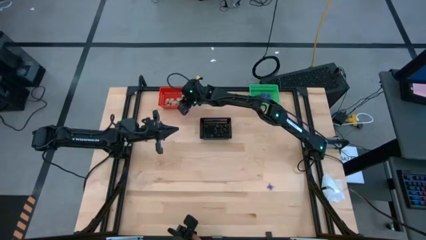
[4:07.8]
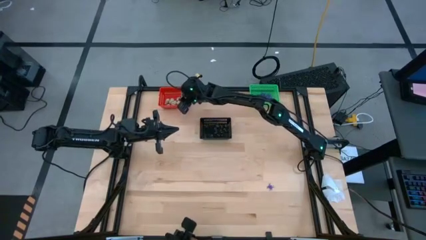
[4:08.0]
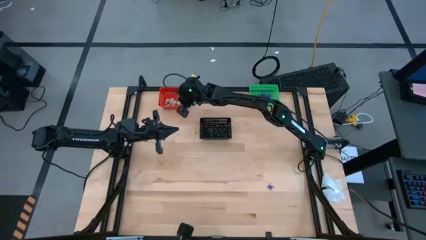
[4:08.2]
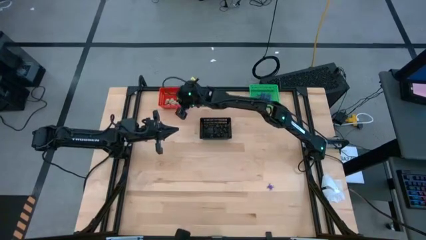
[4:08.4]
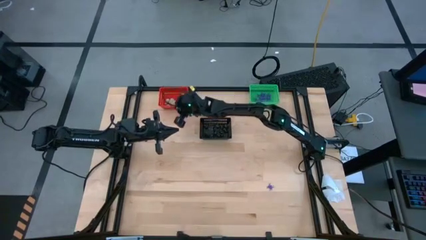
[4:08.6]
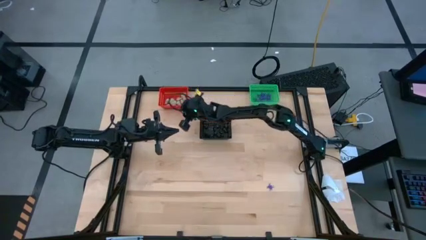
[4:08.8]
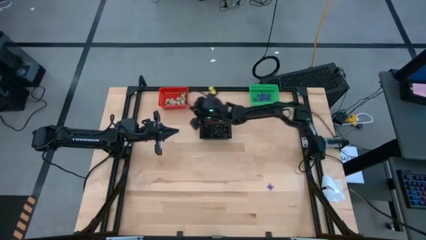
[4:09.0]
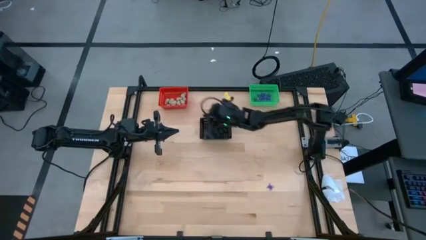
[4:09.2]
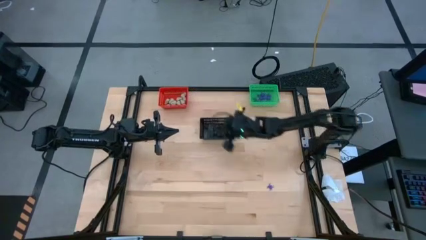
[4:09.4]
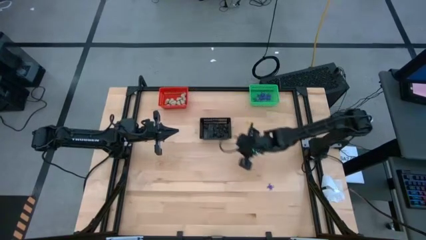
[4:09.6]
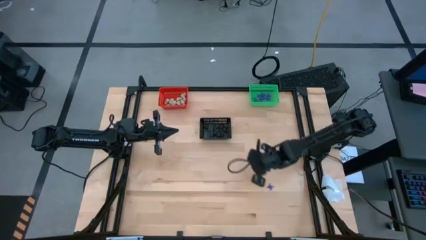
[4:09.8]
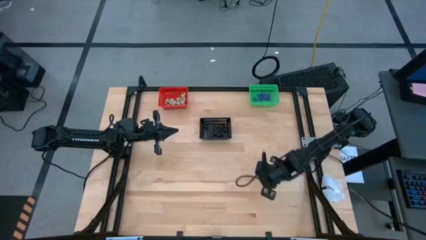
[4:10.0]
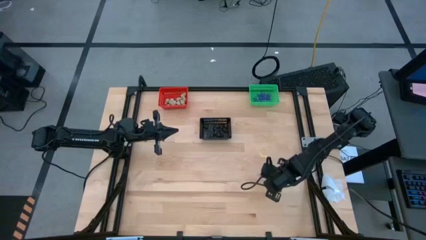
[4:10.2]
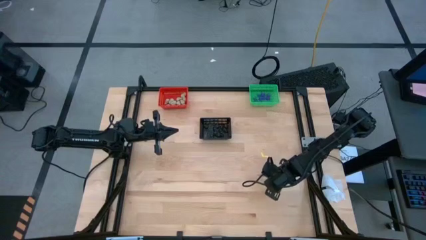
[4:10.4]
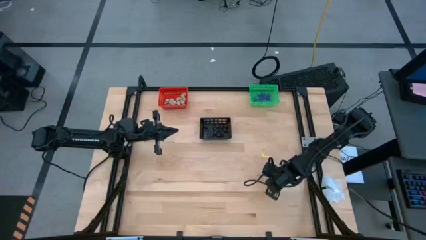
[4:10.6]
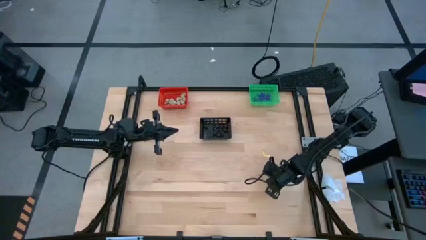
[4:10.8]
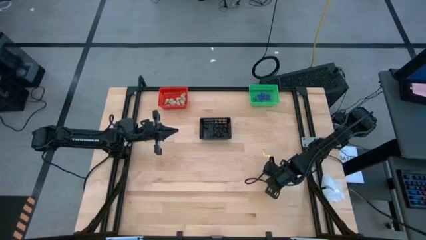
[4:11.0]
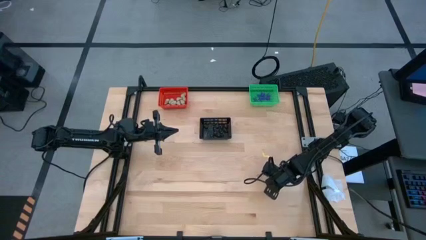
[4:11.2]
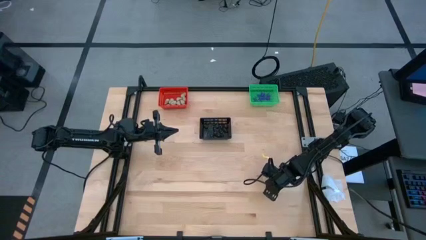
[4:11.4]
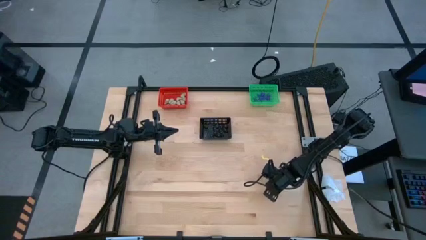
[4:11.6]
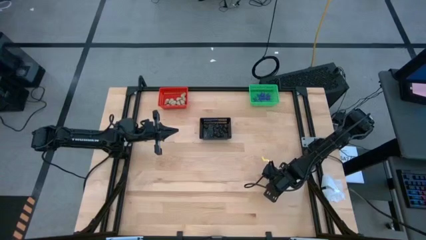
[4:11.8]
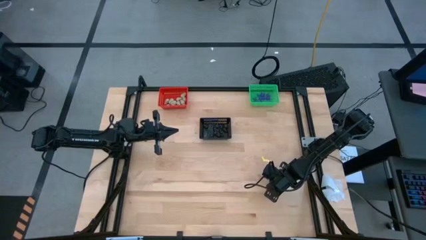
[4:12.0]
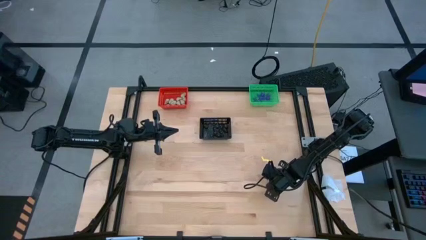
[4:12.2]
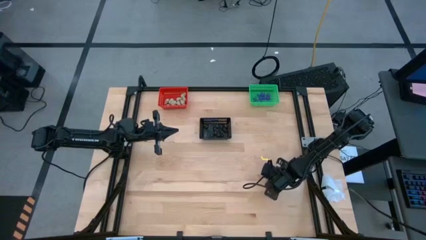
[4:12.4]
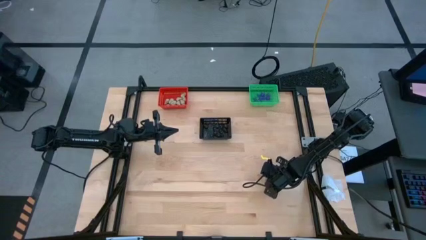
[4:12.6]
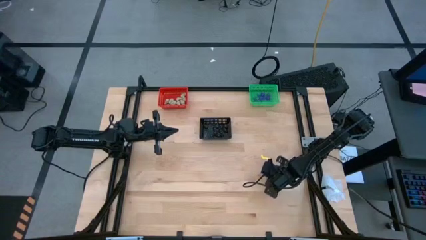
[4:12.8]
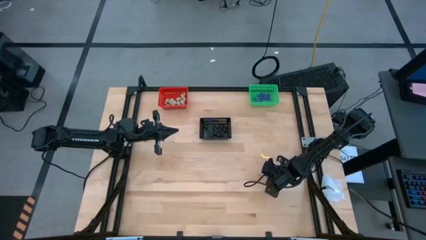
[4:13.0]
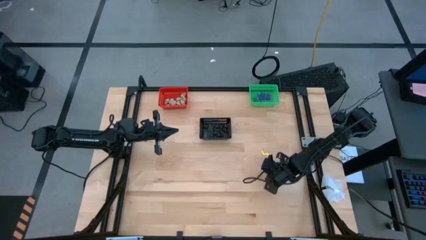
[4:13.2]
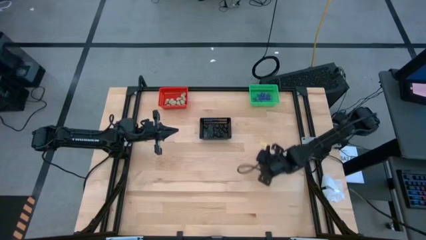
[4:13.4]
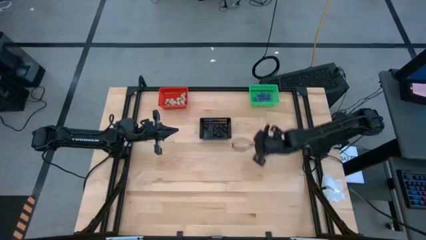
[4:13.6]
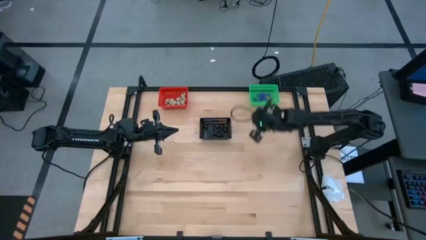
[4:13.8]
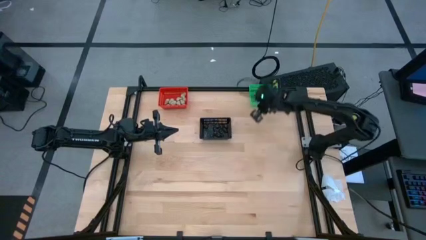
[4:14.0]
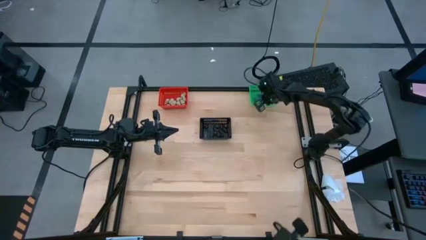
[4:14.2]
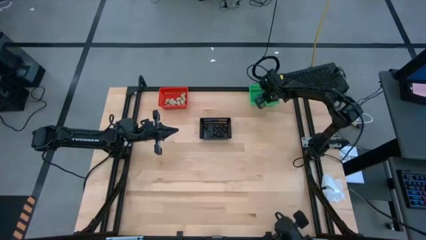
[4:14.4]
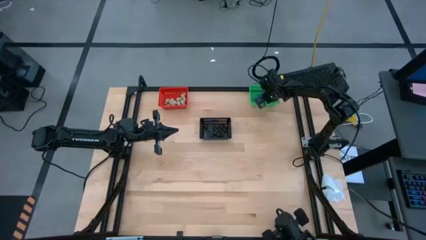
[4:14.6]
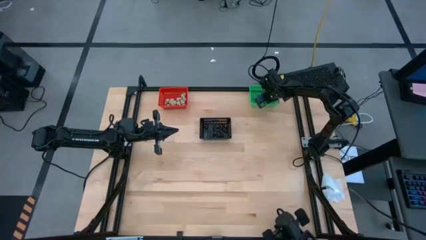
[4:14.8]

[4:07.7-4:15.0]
Task: Sort Halloween decoration
Put the violet spider toy into the green bin

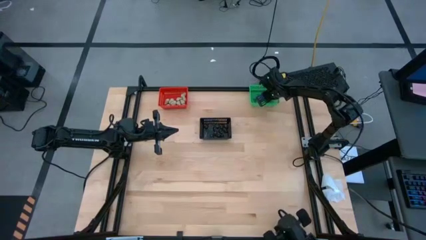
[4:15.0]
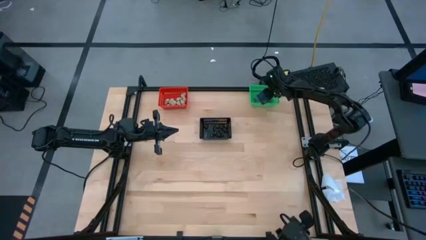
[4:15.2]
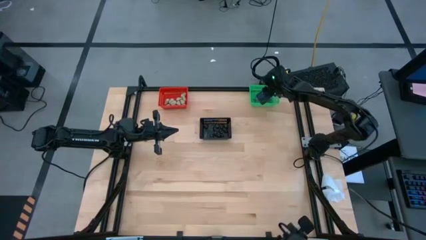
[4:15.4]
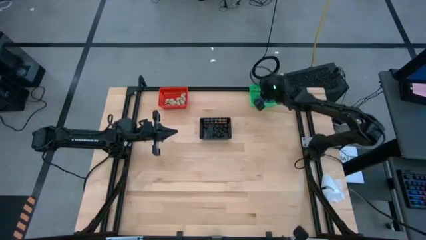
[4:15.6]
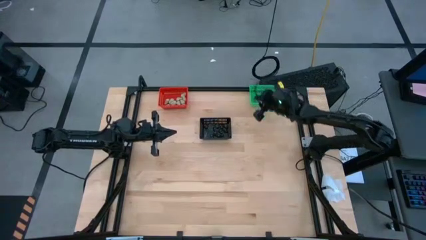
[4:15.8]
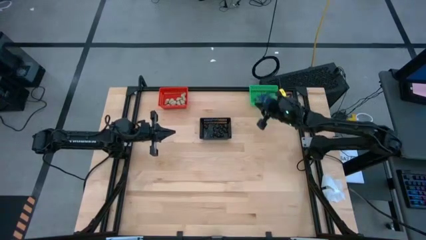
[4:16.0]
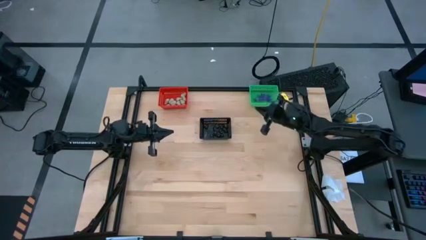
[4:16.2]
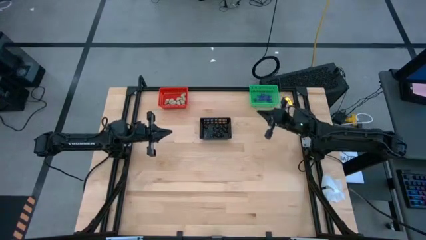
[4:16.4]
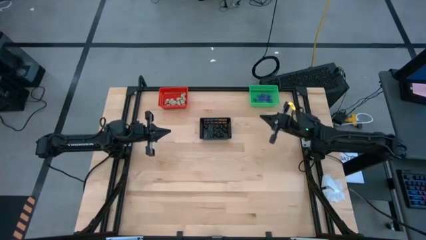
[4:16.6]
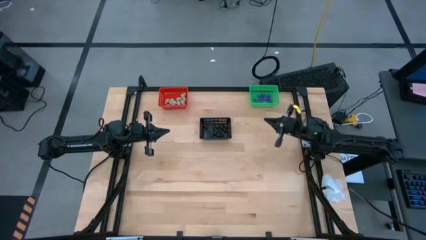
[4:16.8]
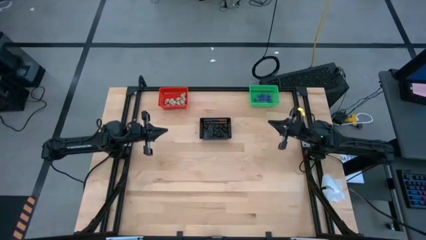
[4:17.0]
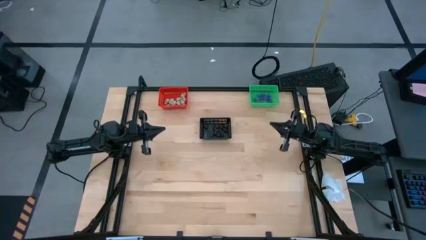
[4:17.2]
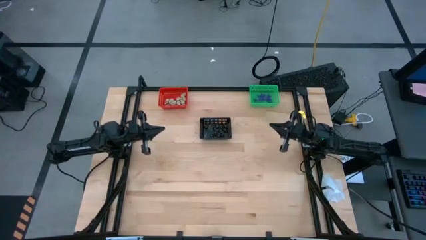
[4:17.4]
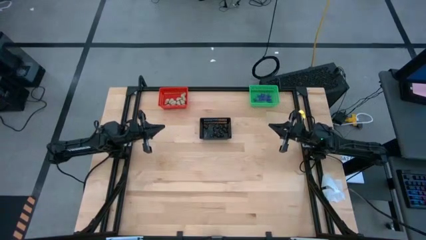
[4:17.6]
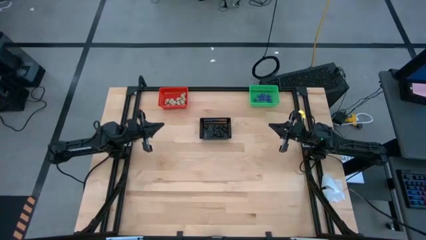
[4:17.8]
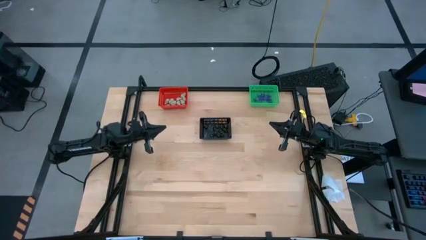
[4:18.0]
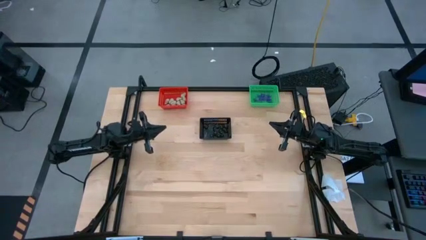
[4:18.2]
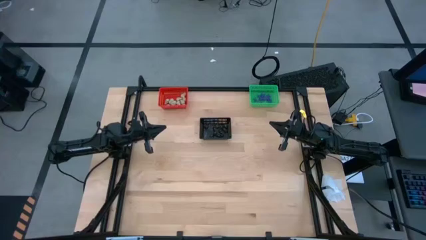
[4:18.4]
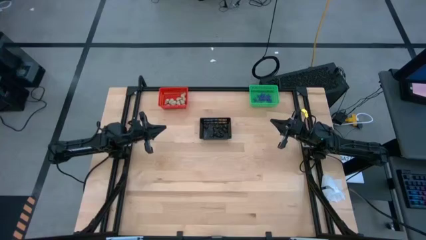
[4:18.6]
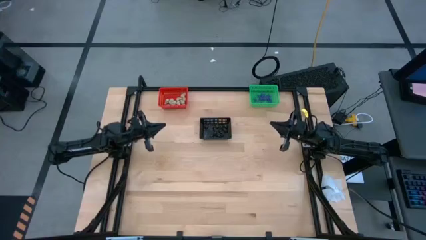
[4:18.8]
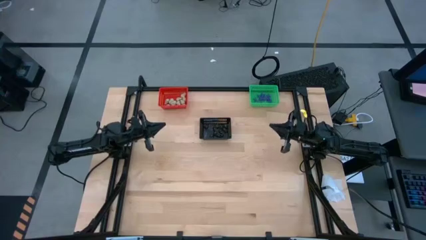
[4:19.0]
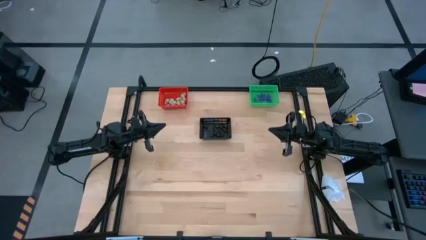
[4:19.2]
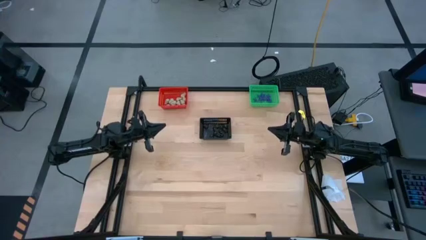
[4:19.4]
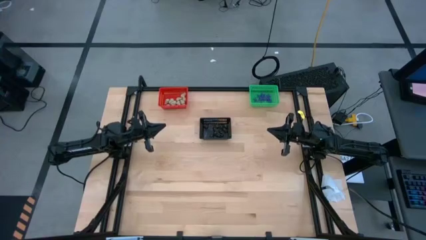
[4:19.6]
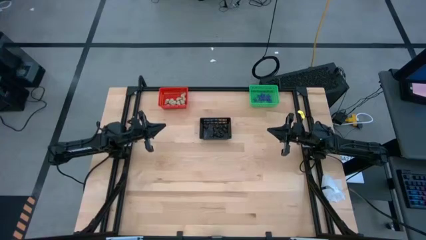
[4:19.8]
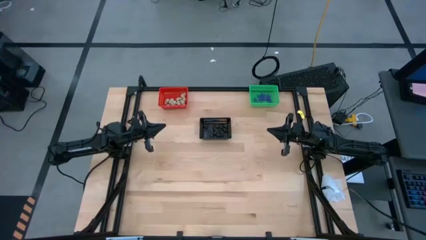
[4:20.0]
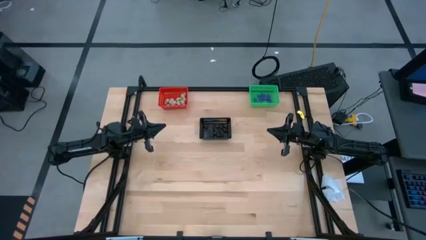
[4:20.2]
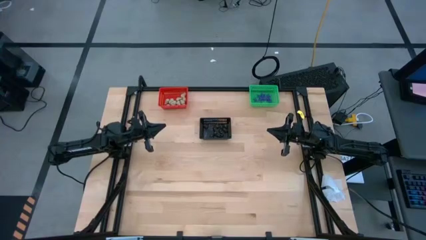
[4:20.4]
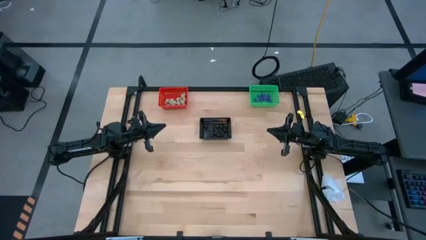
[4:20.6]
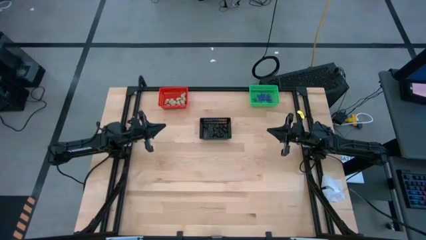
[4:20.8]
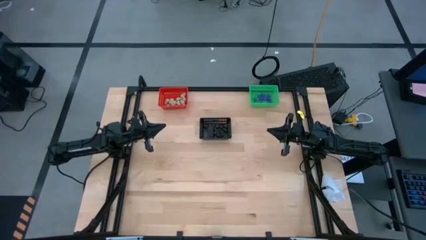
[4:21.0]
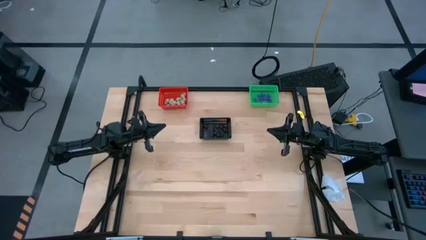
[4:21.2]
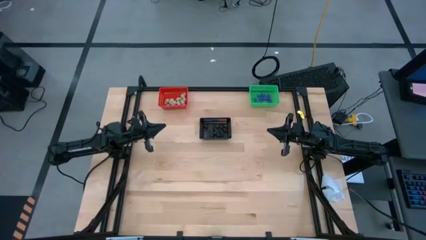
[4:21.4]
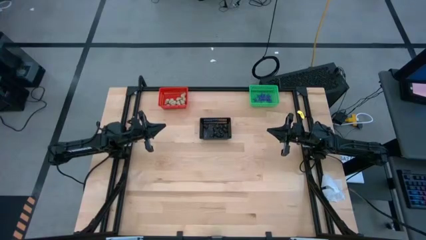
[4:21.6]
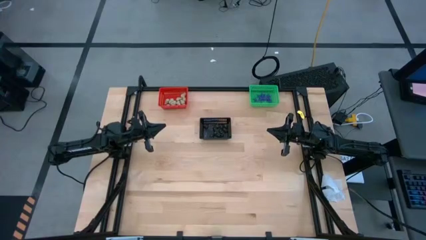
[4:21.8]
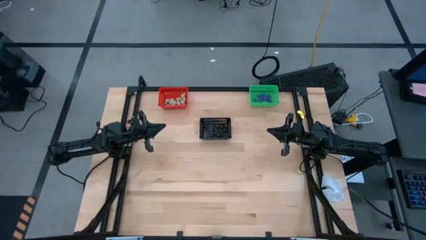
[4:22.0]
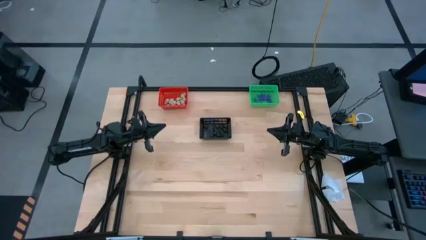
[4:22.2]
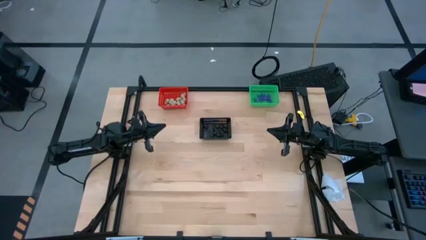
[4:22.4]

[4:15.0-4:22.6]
Return to Home Position
